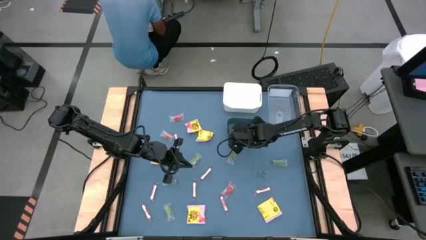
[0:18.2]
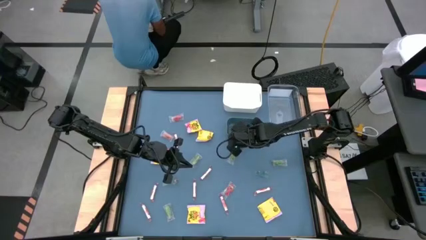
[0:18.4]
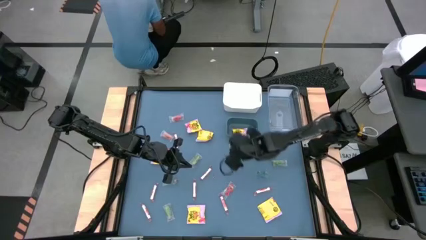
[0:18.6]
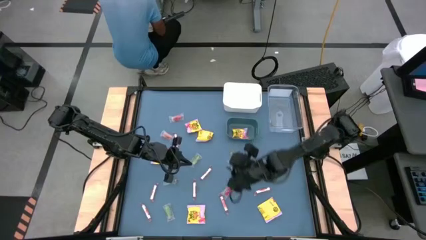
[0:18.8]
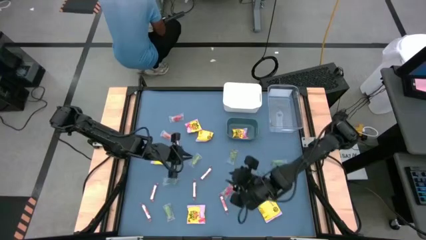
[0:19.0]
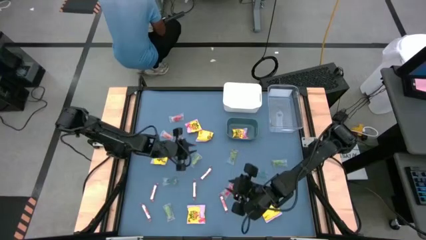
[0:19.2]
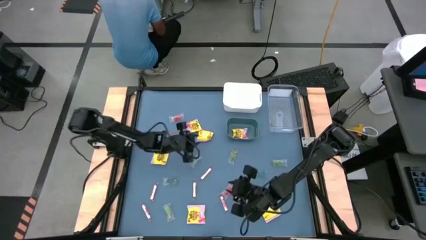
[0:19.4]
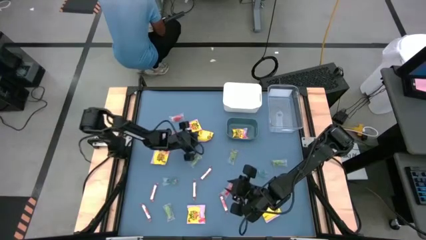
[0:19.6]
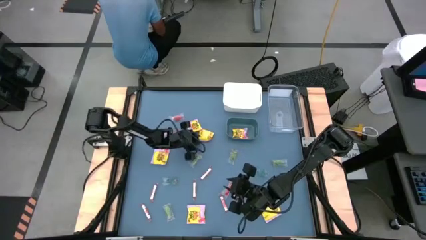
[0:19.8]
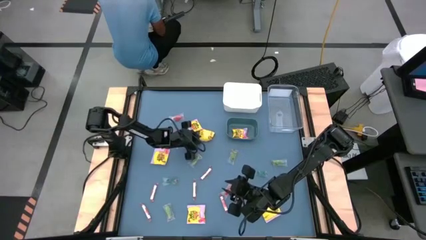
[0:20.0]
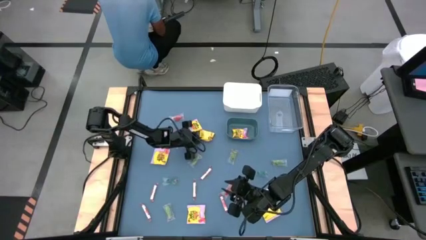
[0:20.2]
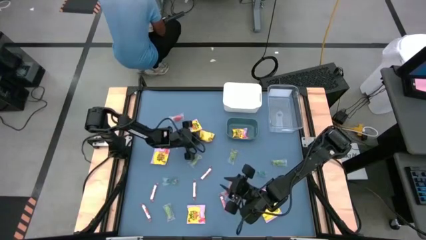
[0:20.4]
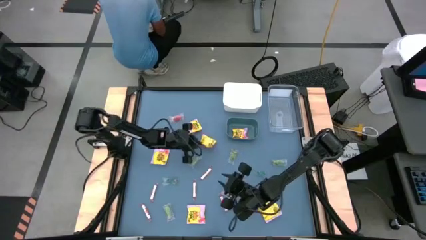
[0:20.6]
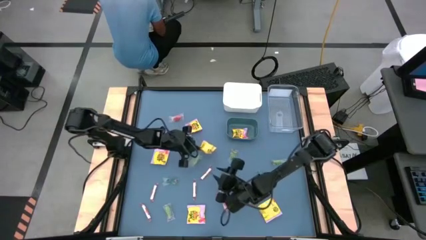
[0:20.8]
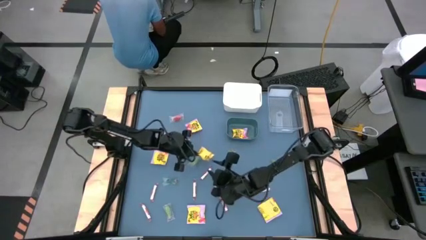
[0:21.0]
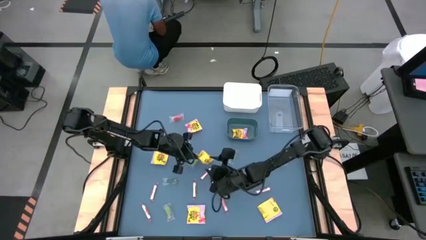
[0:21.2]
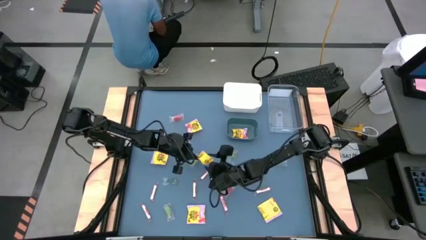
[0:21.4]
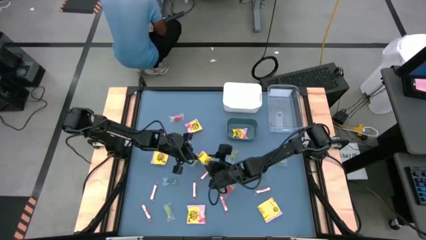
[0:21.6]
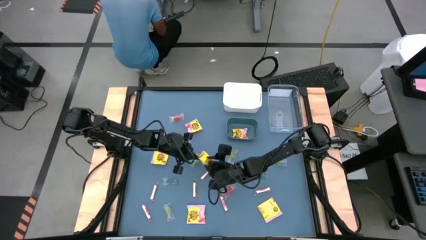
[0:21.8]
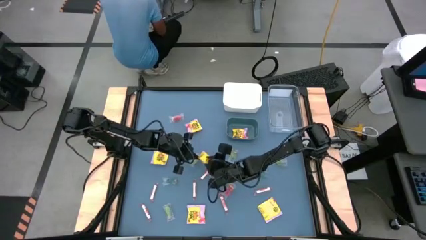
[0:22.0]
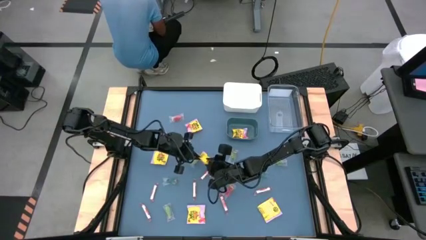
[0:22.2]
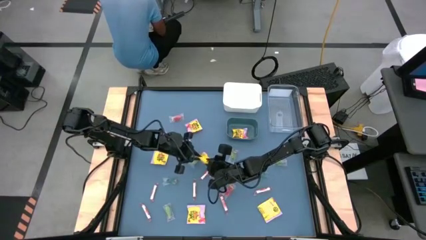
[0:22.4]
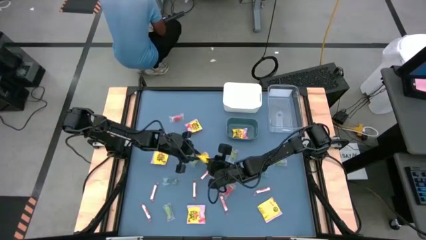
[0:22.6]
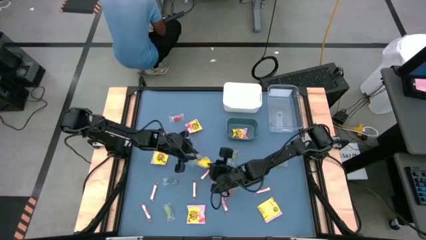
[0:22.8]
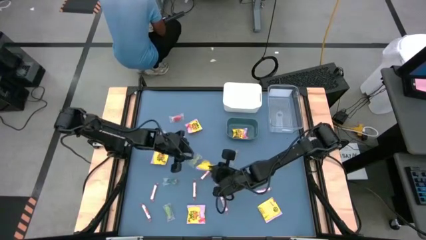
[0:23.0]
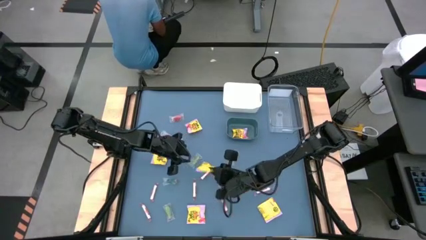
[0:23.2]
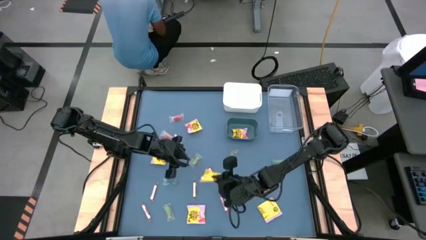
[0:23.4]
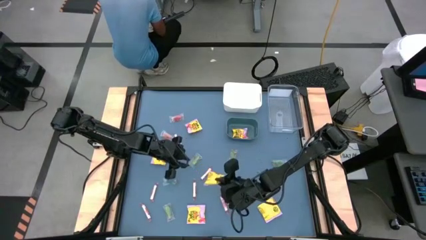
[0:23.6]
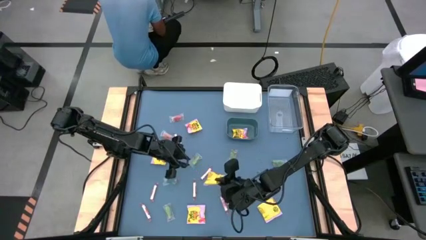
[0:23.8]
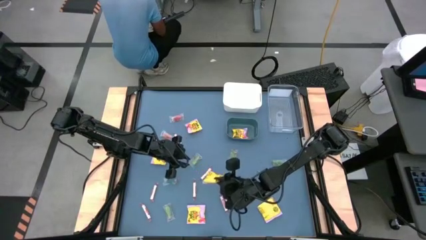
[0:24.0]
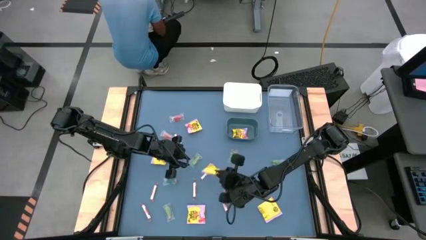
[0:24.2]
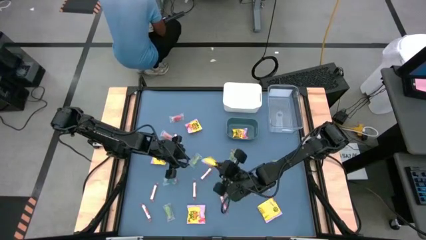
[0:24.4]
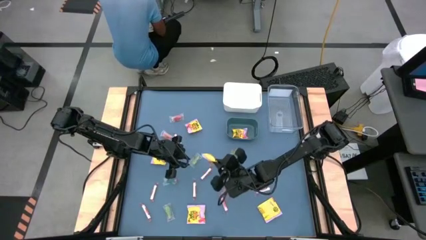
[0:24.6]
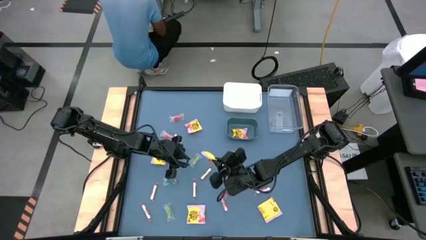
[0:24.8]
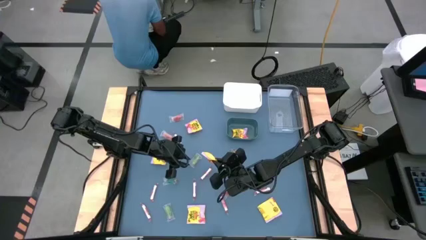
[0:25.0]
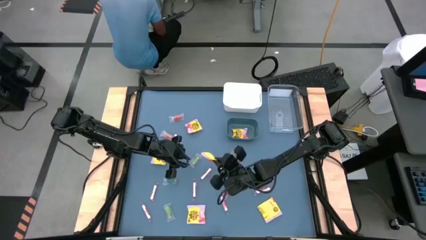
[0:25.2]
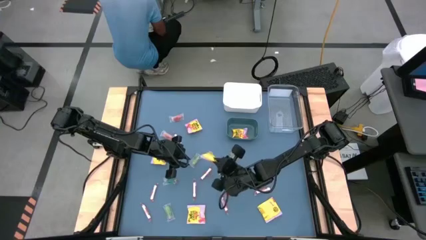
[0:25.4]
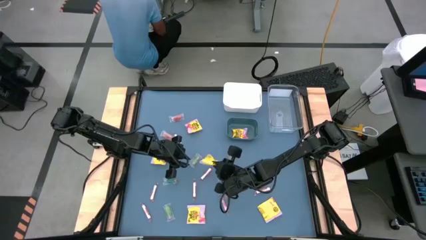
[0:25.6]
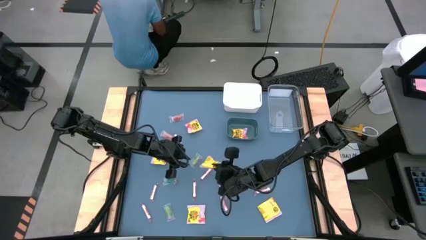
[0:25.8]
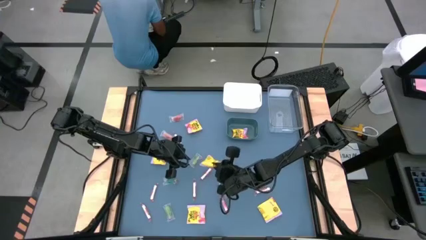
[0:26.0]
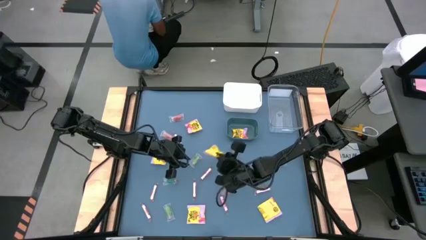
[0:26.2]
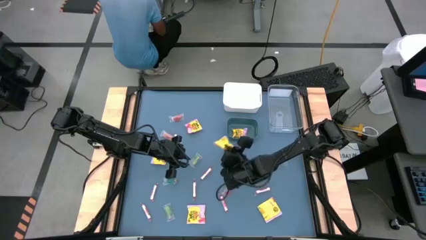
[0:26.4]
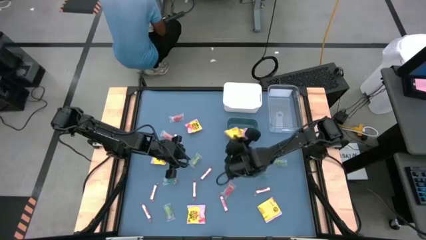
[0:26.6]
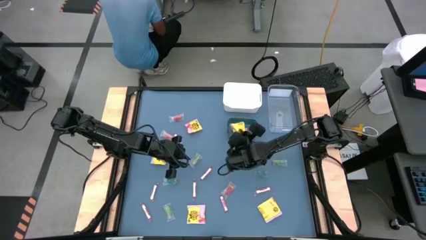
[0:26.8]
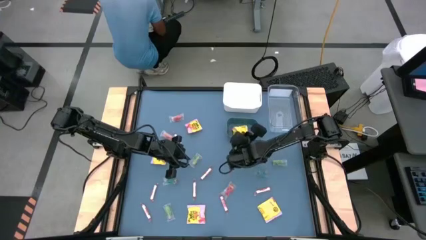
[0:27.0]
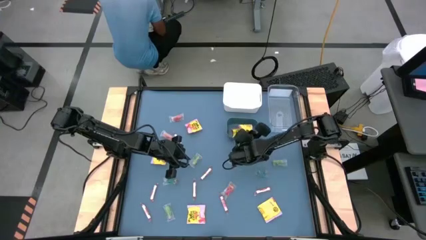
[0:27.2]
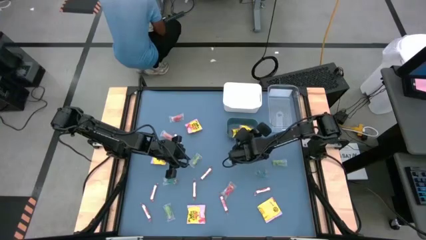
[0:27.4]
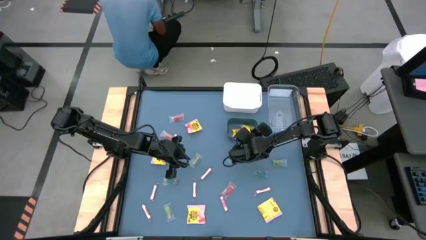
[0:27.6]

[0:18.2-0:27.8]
Task: Sort candy
Put the top center yellow candy into the green bin

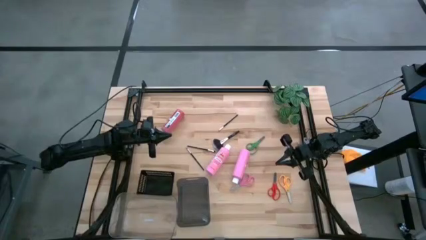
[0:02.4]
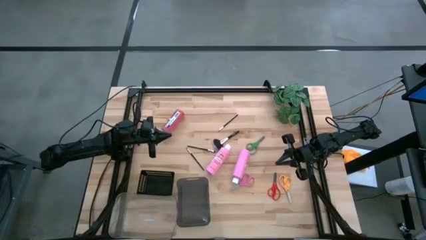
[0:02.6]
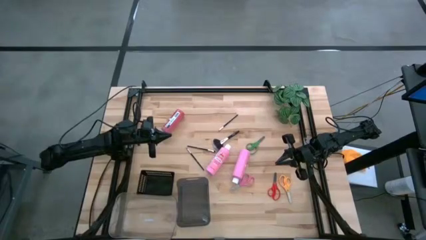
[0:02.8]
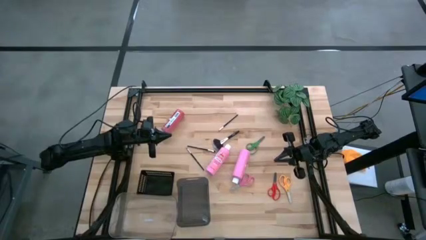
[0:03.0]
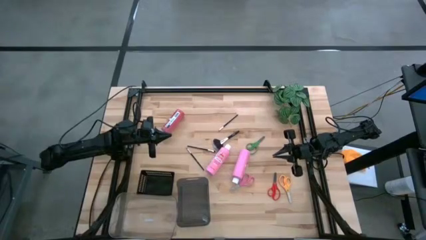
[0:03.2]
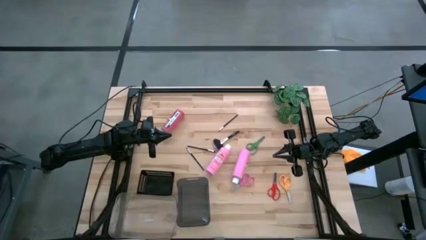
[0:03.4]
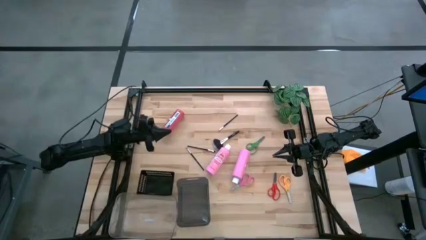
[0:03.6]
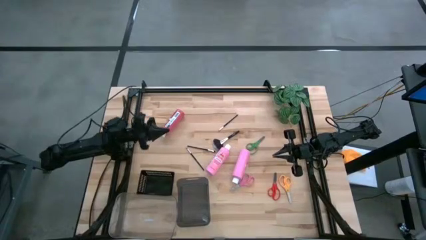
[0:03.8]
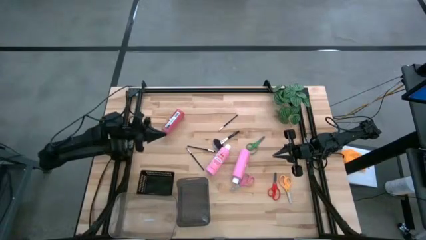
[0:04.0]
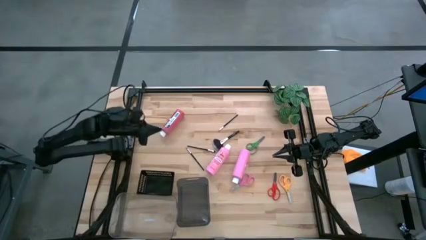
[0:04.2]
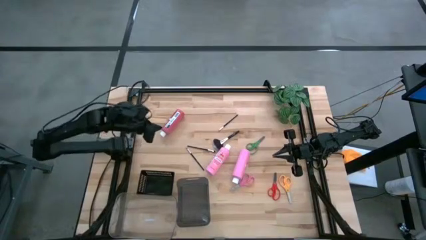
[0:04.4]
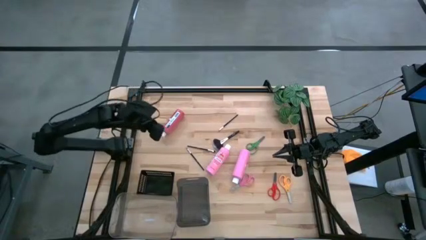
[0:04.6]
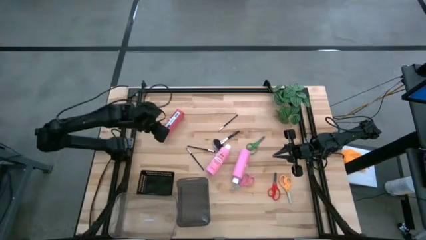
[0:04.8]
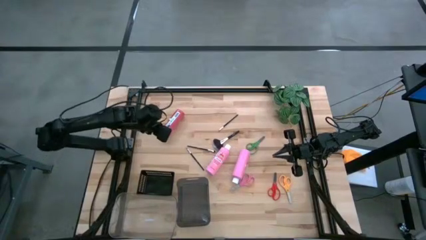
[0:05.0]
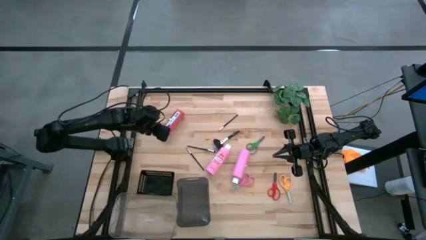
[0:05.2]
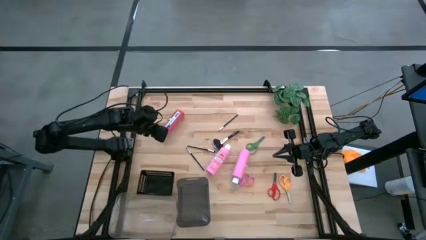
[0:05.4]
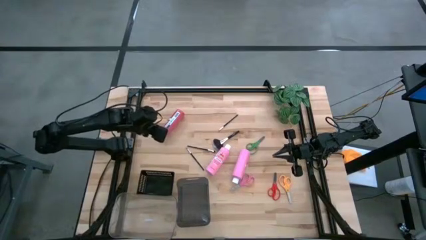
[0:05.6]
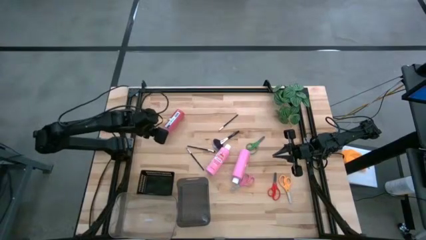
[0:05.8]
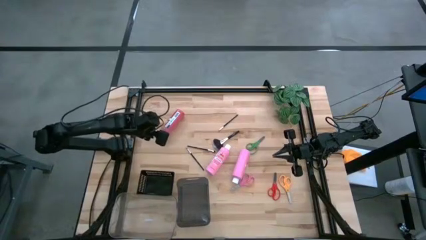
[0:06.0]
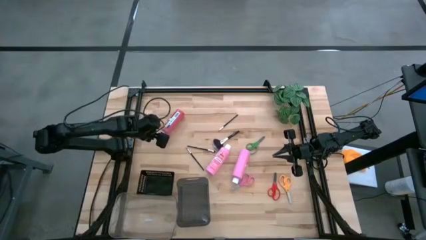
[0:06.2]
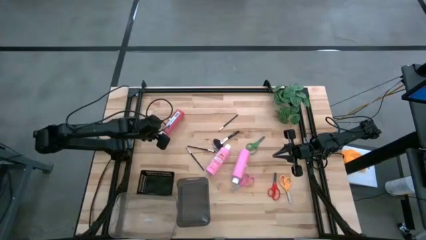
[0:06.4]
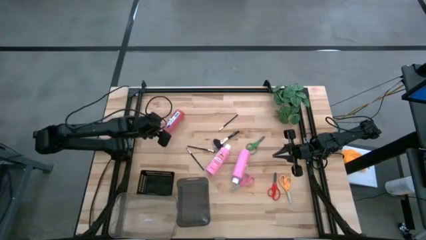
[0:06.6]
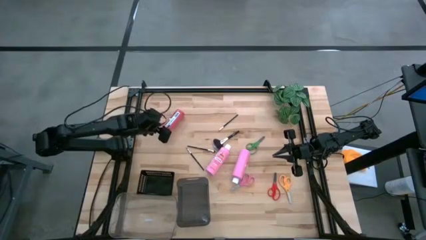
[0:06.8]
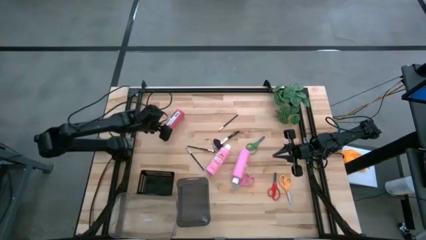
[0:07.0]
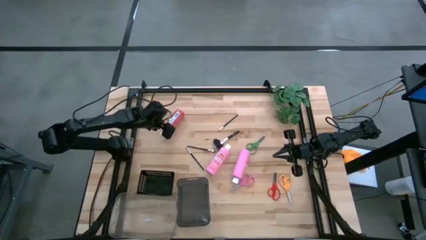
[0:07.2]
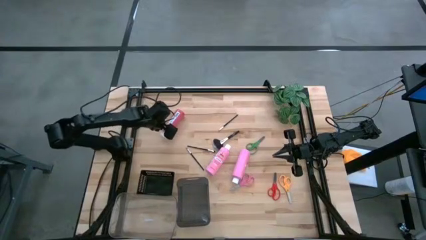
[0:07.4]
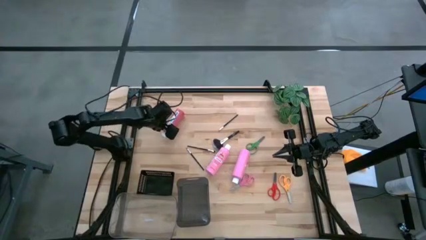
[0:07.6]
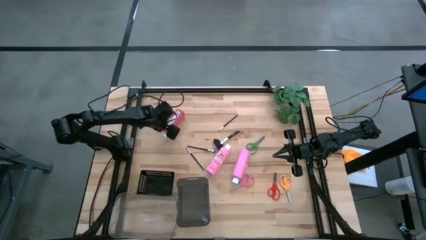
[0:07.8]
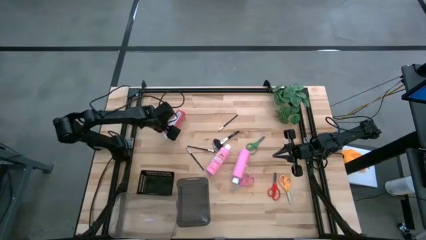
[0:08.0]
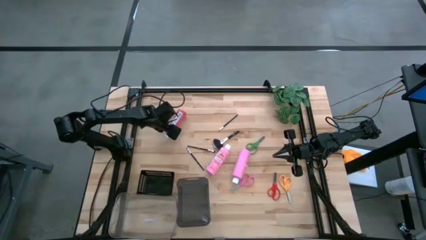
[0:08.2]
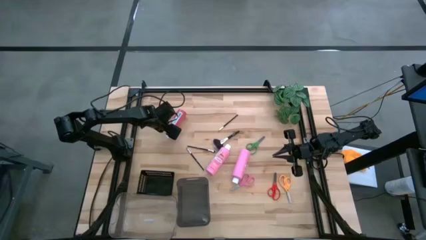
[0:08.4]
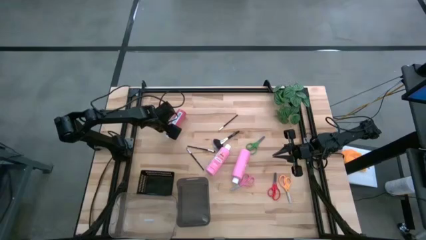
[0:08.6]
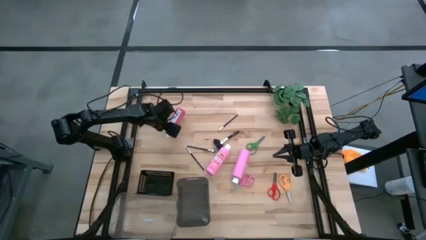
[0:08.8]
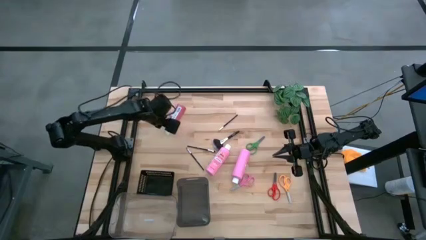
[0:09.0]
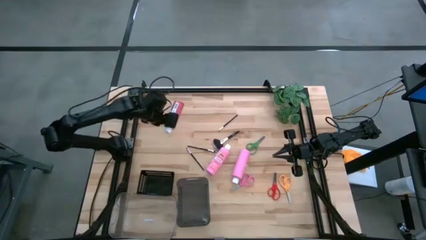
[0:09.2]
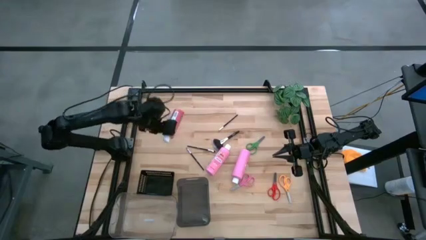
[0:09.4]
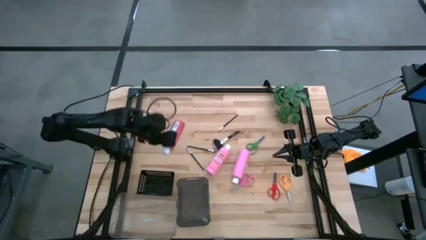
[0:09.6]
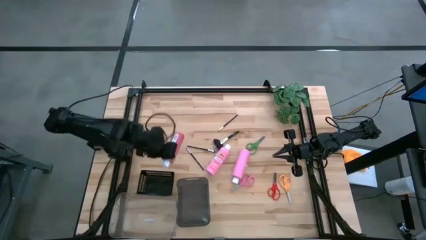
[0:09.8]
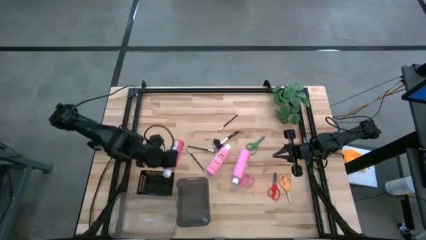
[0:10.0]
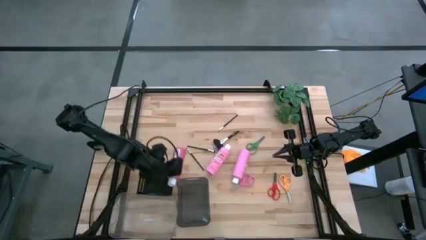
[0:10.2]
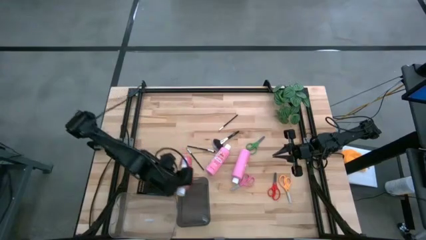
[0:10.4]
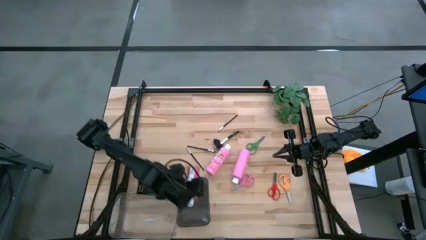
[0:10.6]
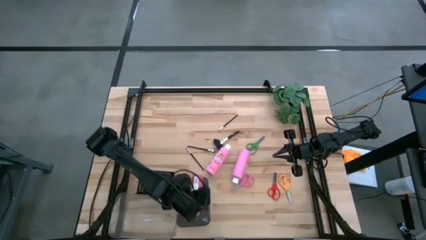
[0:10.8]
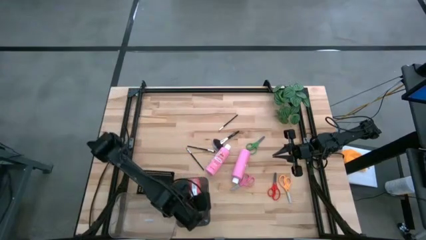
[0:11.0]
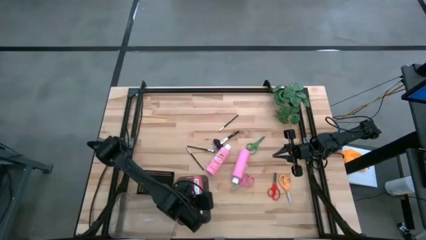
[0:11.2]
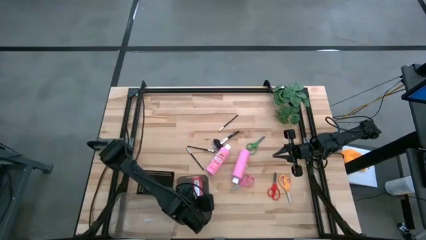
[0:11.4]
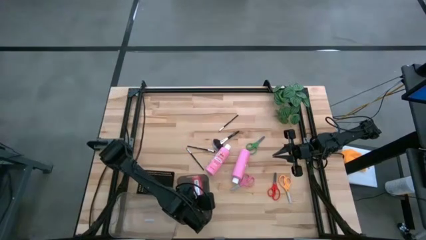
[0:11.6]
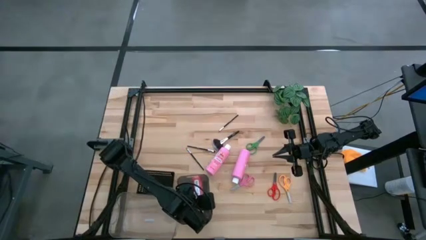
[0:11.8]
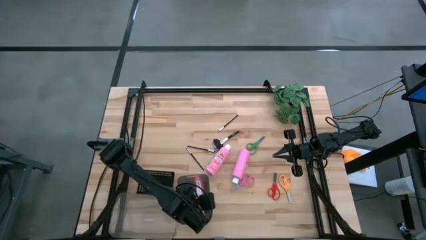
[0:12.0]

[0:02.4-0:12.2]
Task: Pick & Place Paint Supplies
Put the red paint bottle into the gray bin
